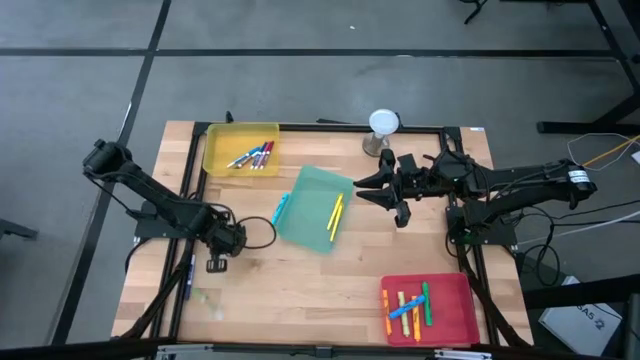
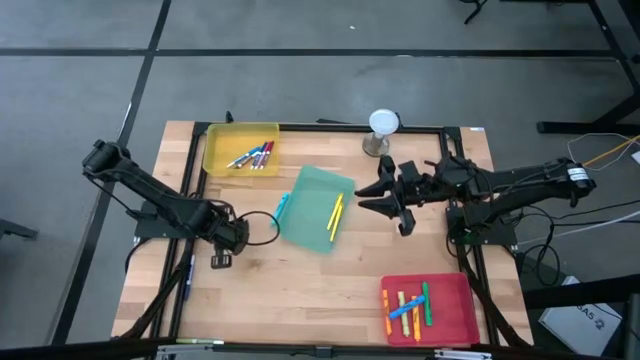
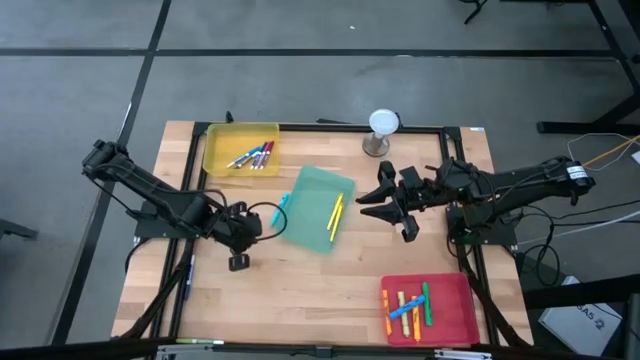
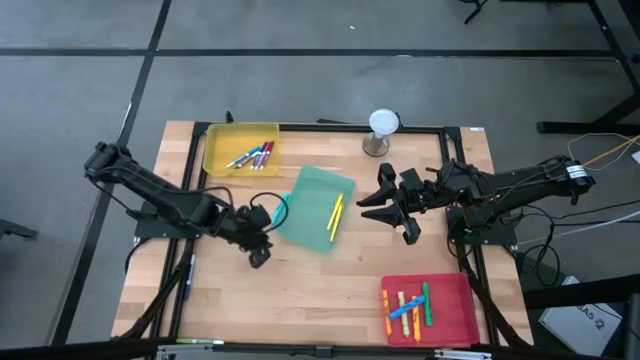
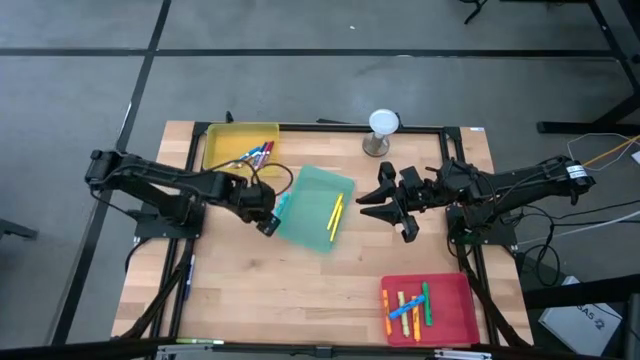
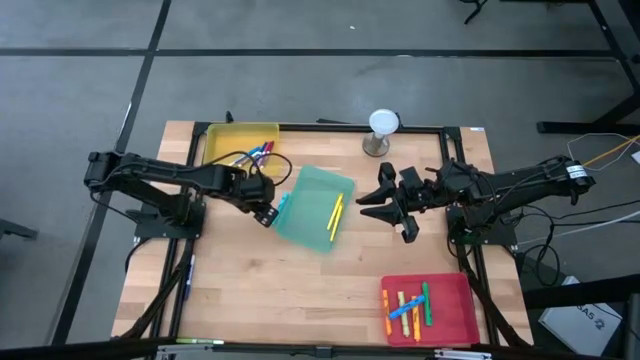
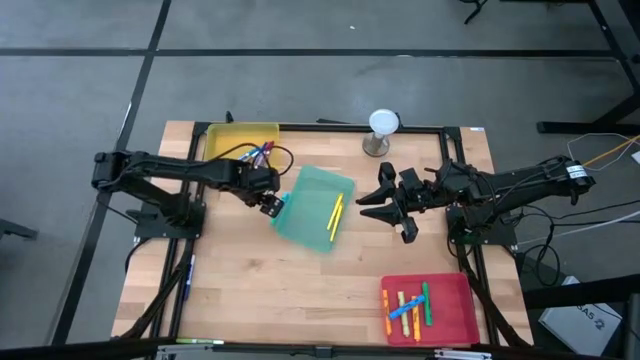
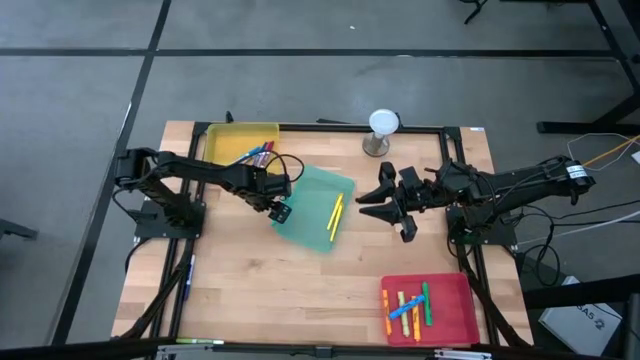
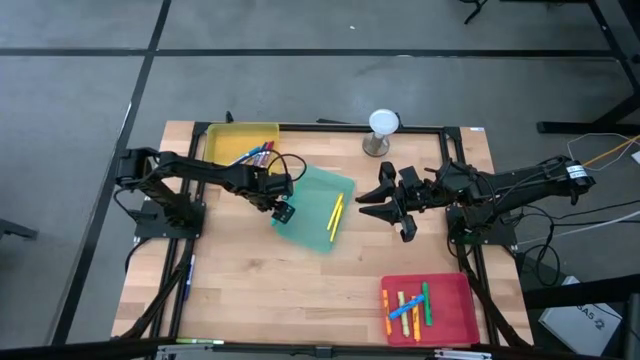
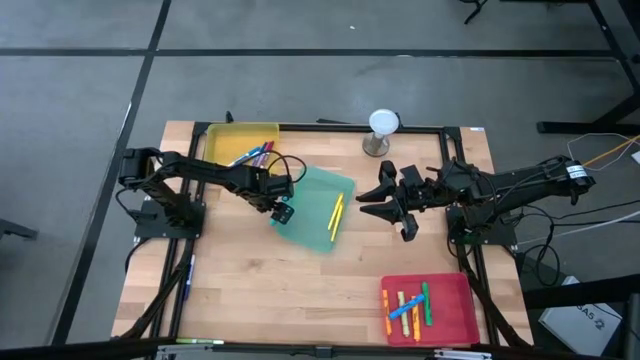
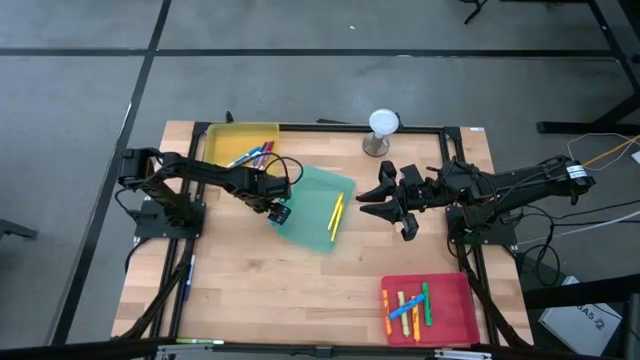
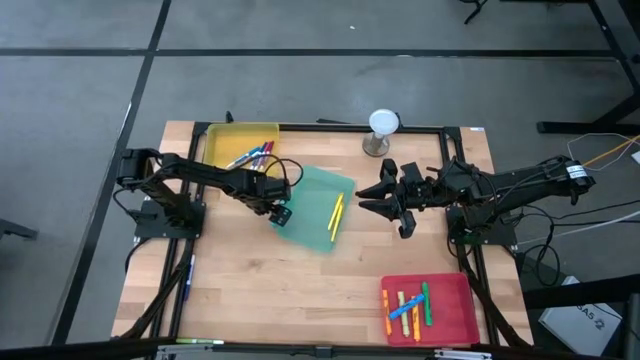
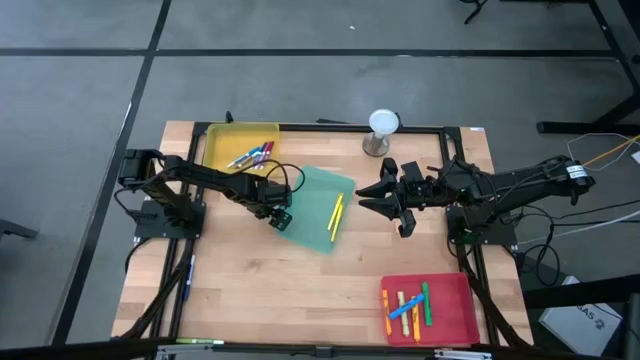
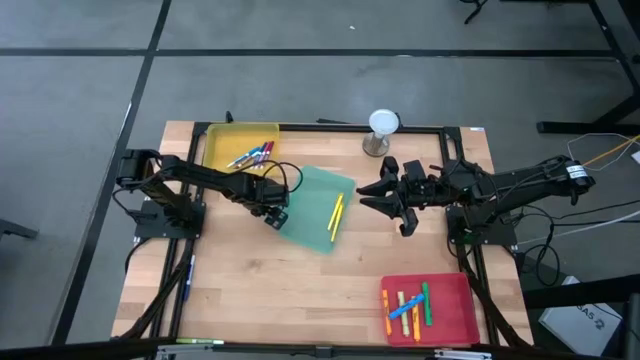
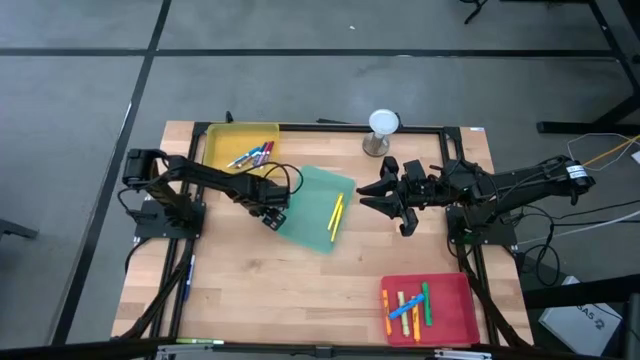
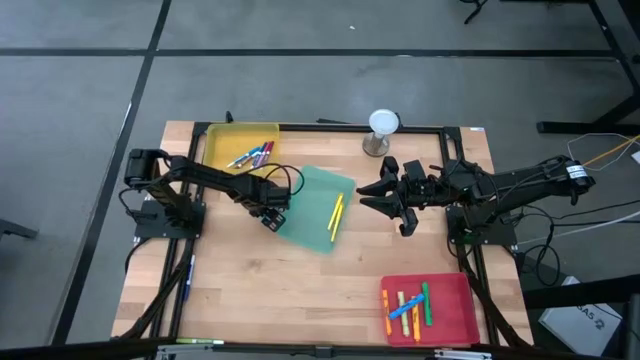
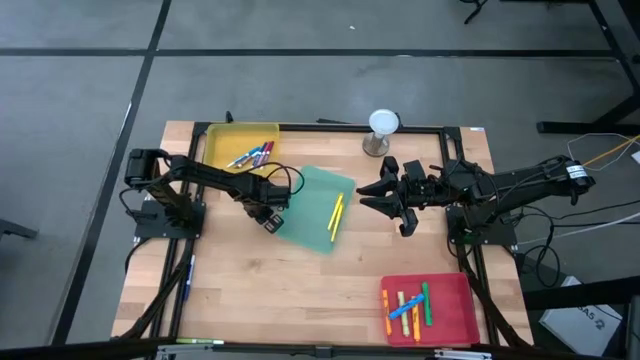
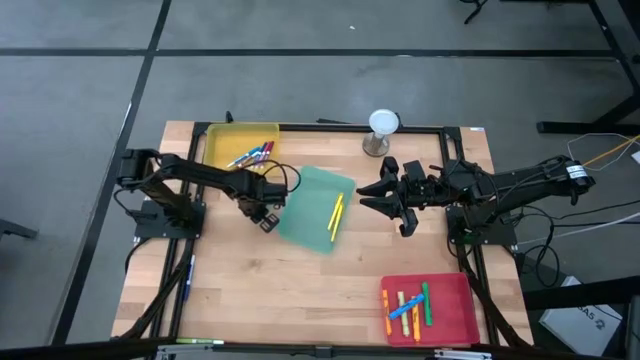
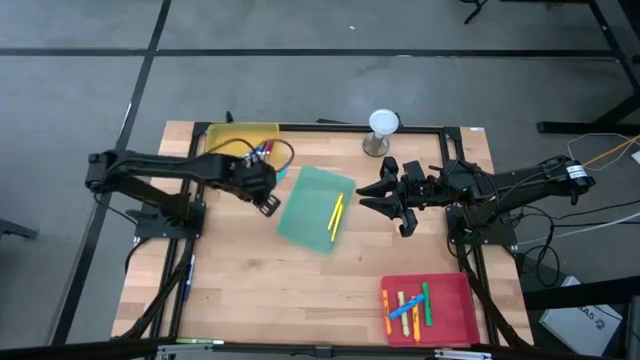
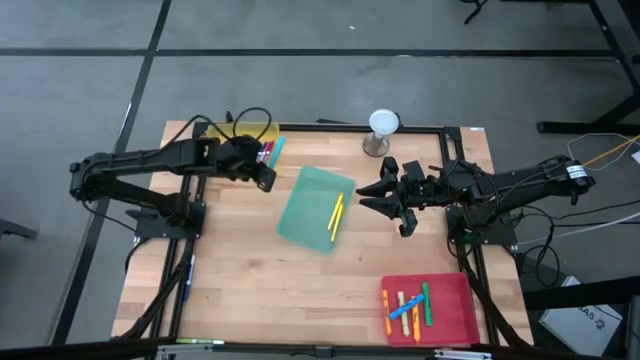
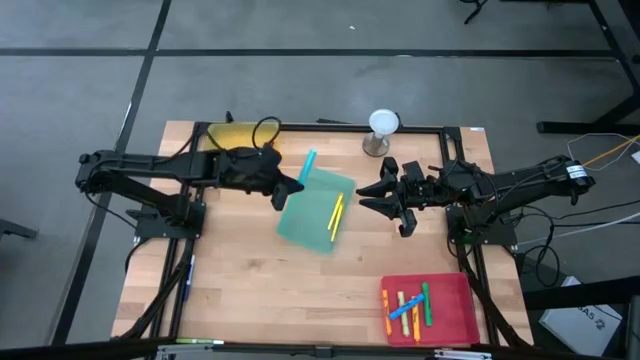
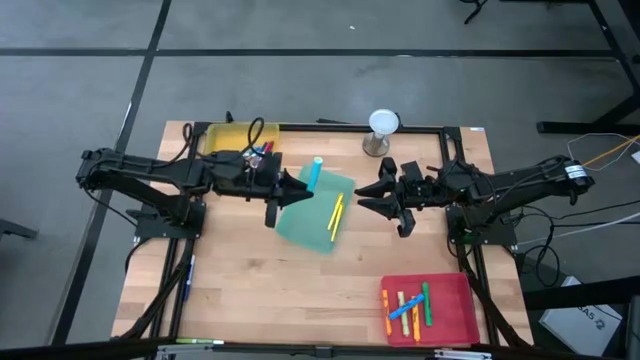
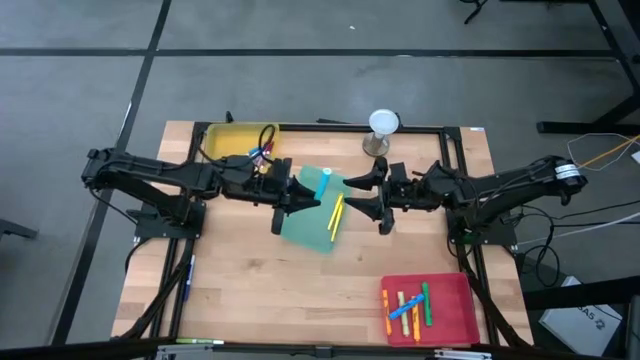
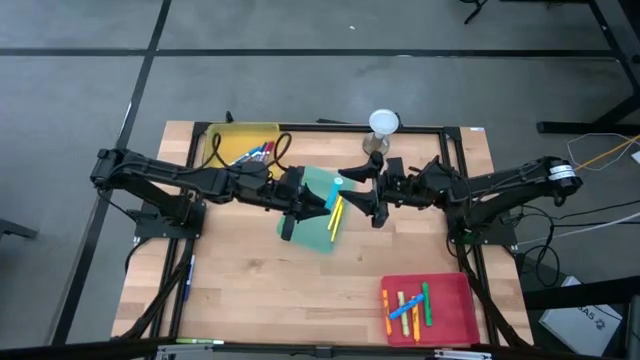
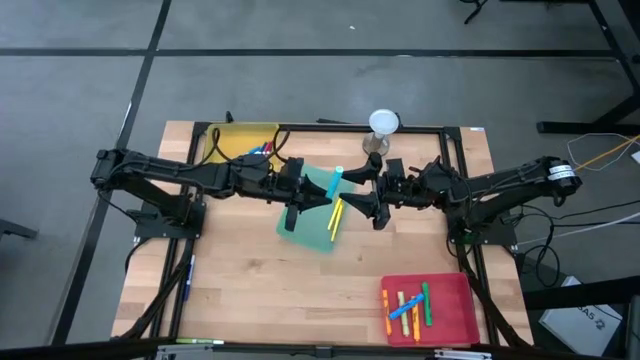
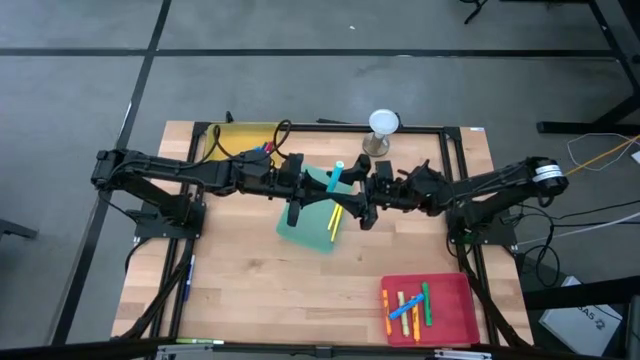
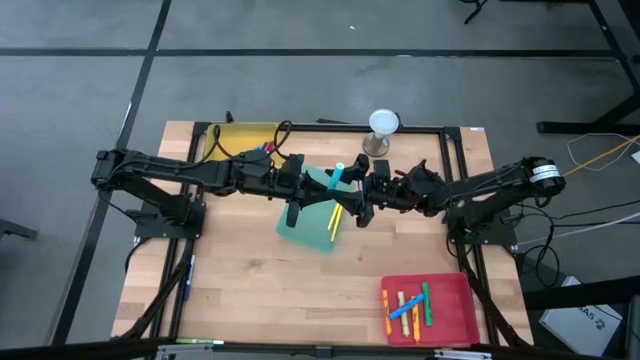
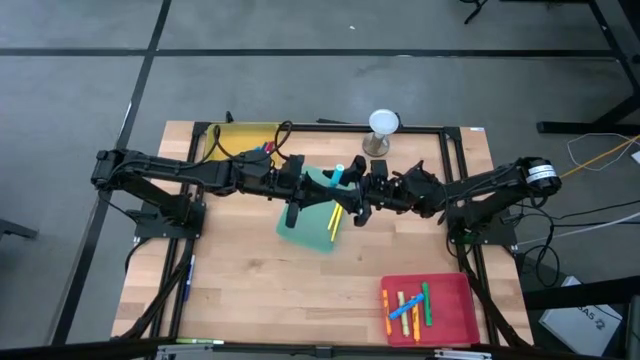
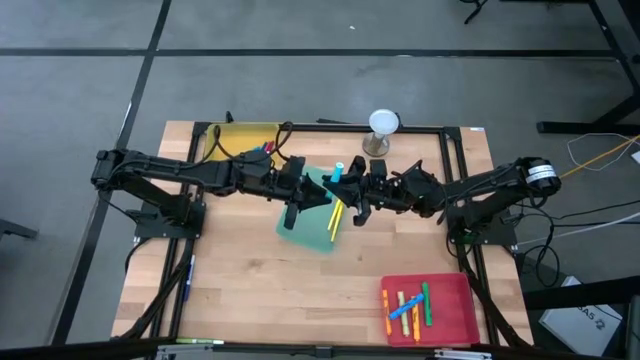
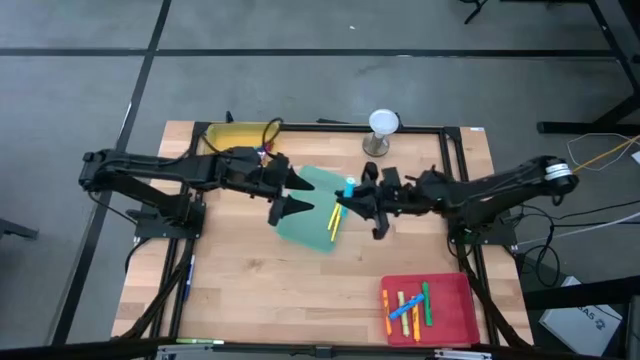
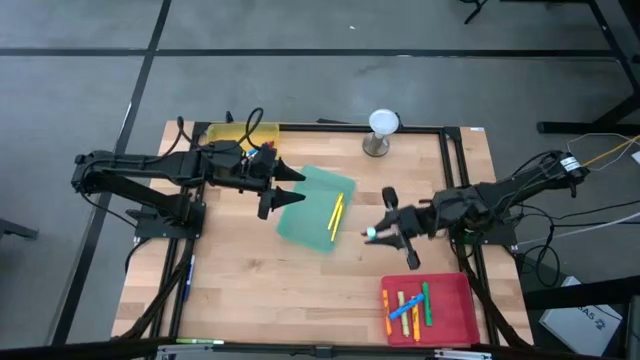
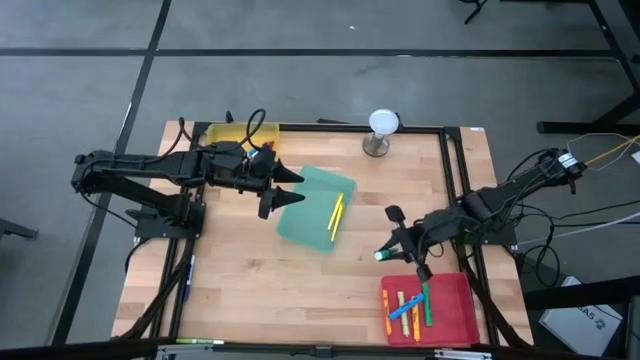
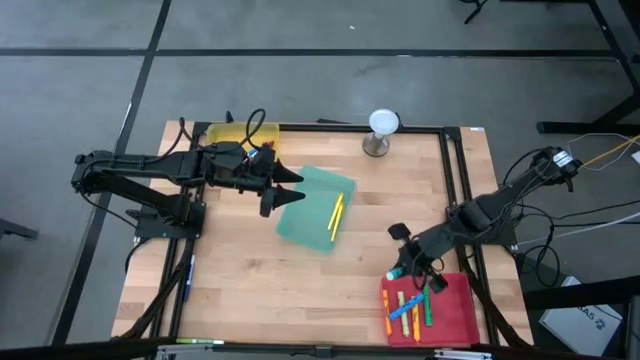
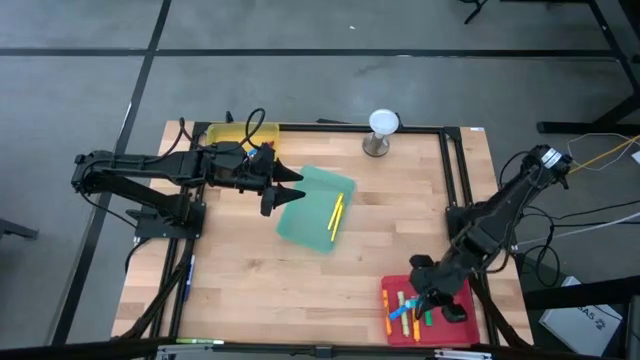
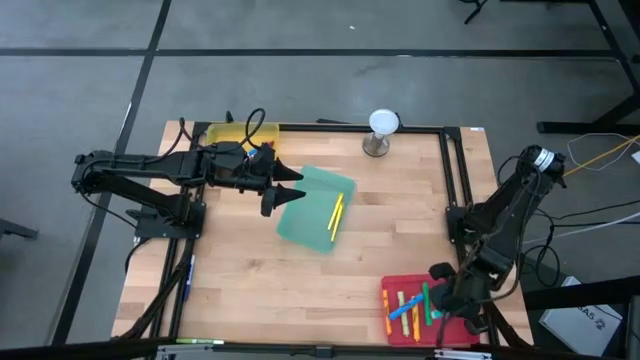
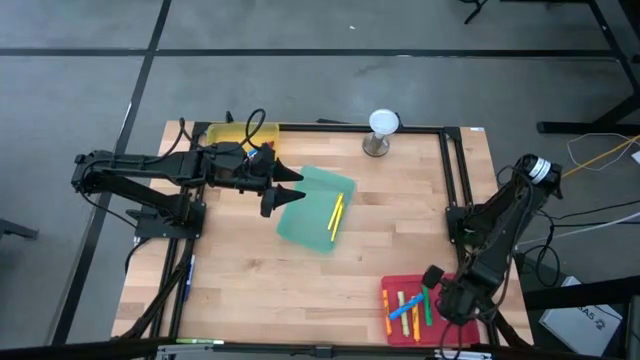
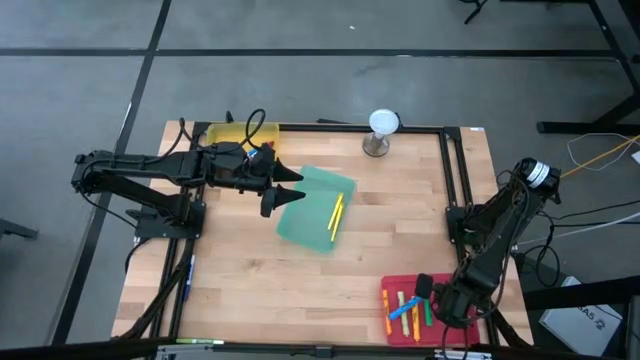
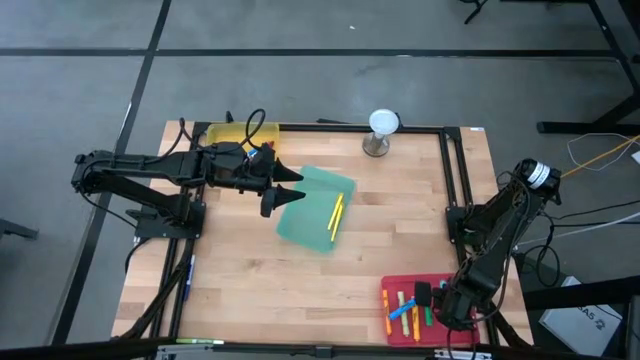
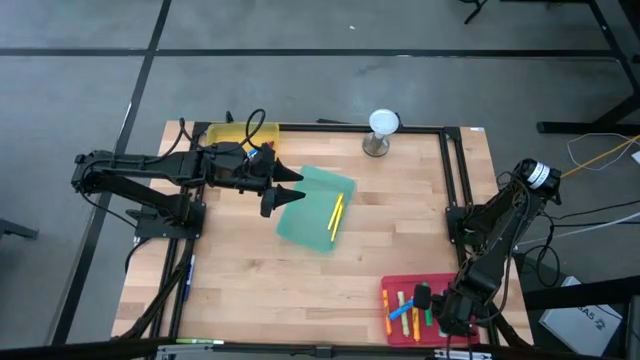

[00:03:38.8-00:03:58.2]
Task: Pick & Place Markers
Put the light blue highlighter pen into the pink bin

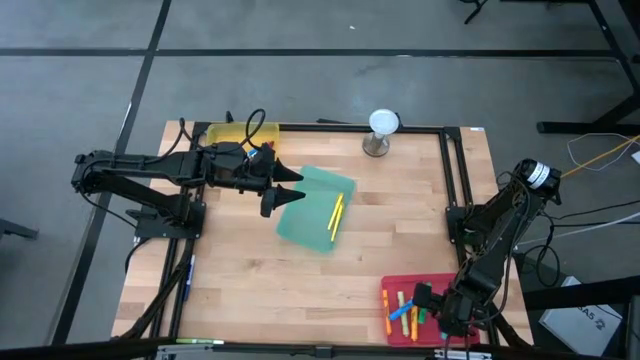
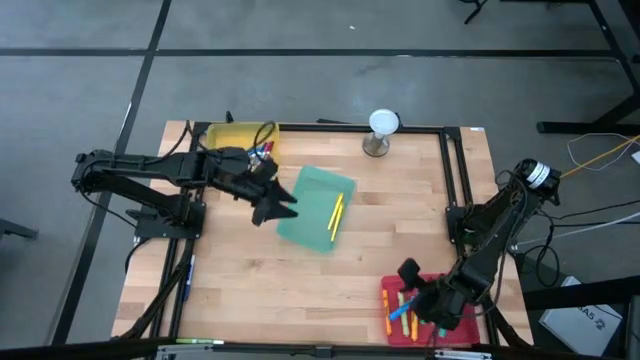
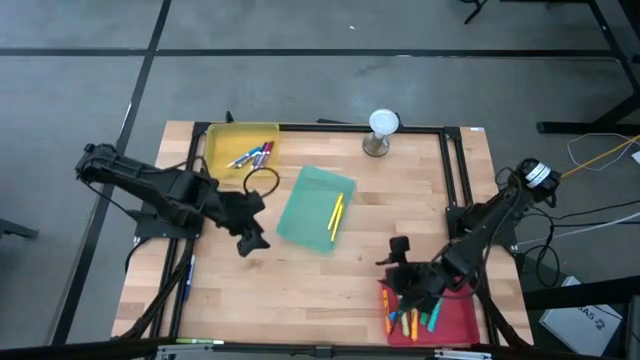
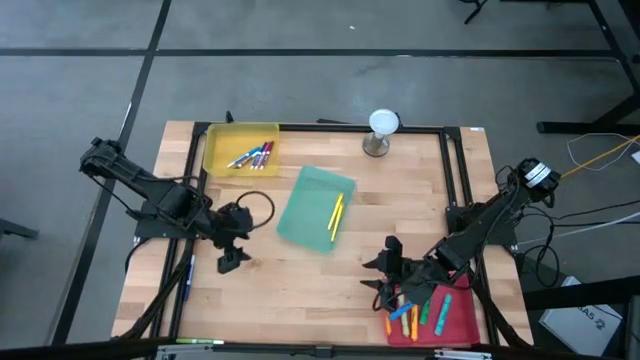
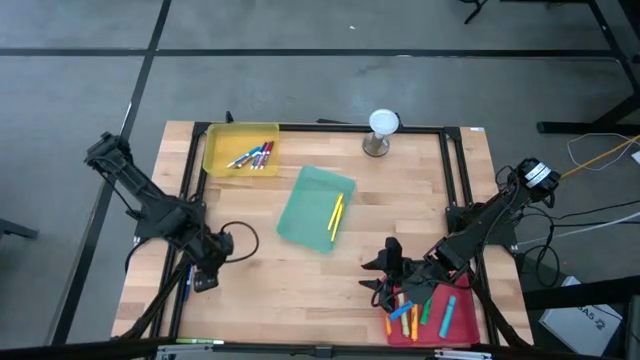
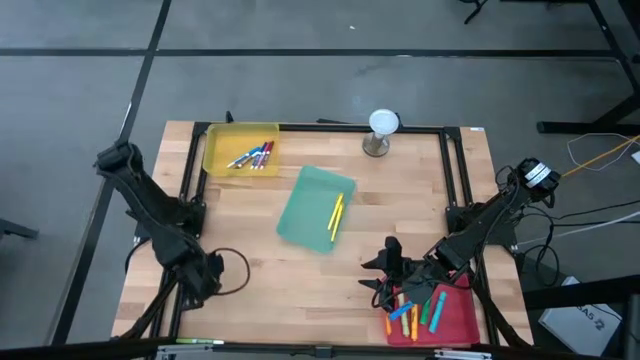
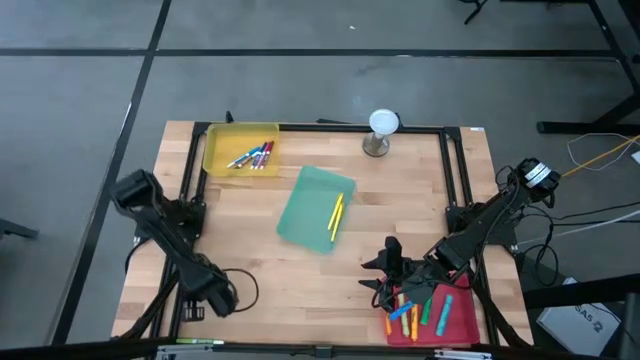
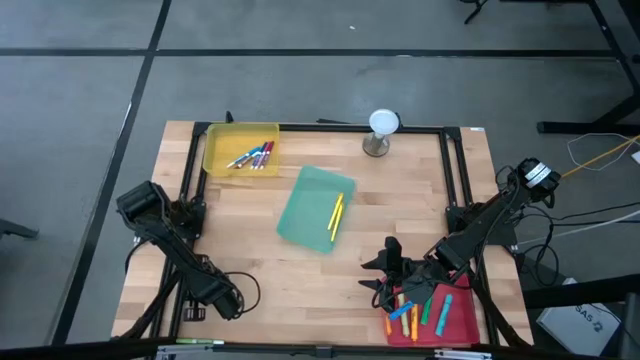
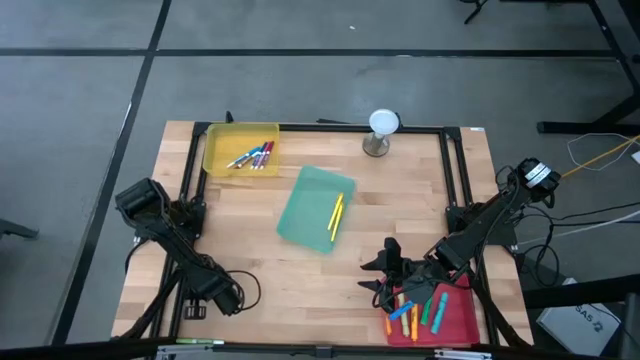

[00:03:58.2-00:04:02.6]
Put the blue marker pen into the yellow bin
